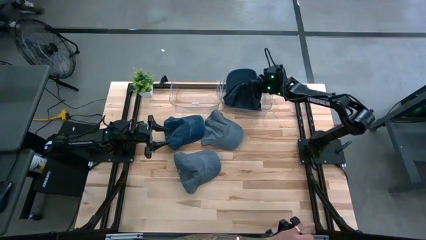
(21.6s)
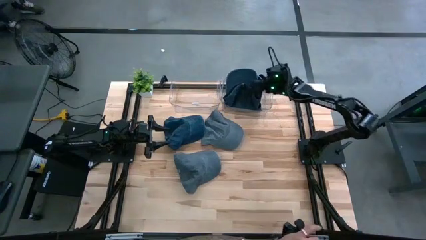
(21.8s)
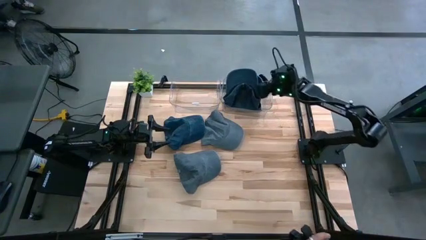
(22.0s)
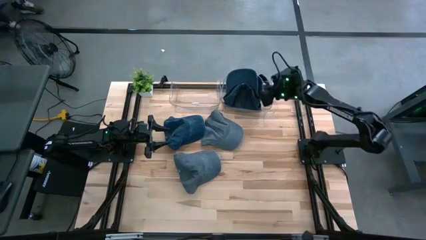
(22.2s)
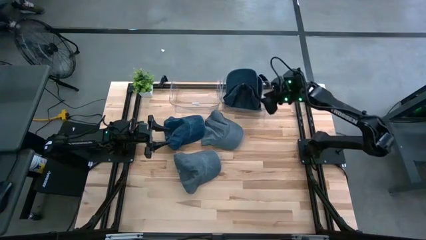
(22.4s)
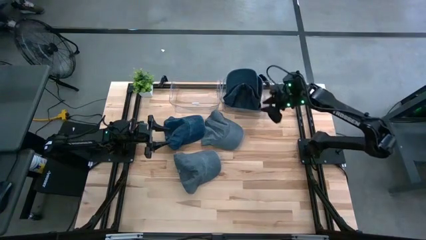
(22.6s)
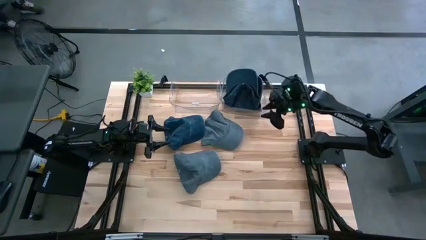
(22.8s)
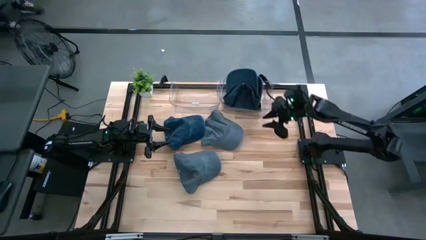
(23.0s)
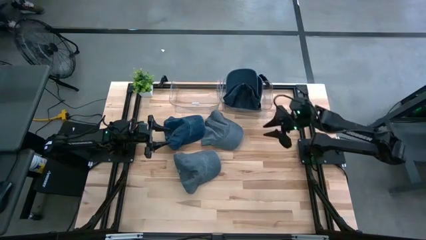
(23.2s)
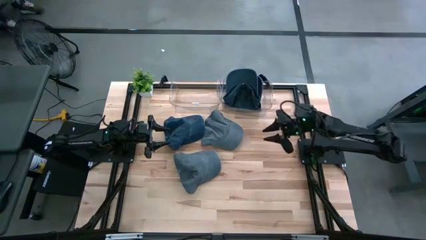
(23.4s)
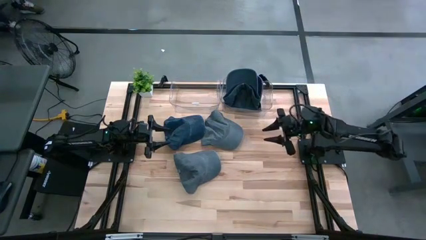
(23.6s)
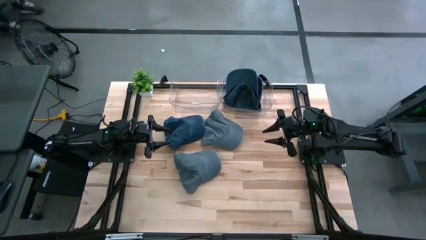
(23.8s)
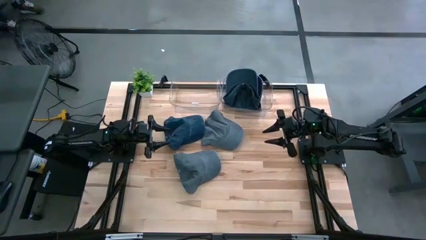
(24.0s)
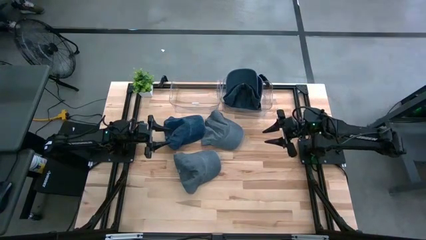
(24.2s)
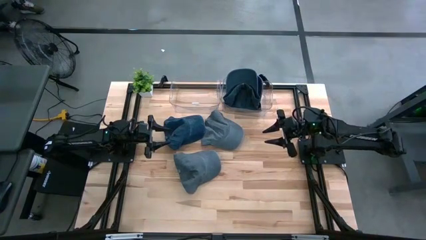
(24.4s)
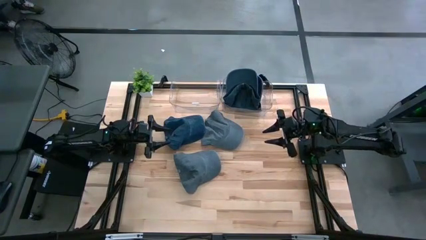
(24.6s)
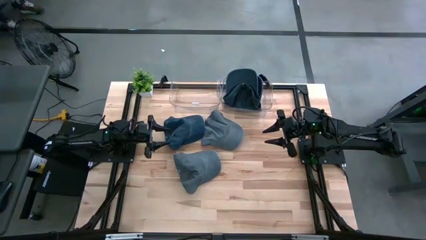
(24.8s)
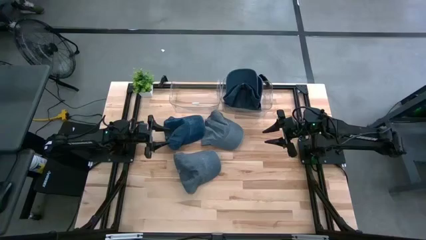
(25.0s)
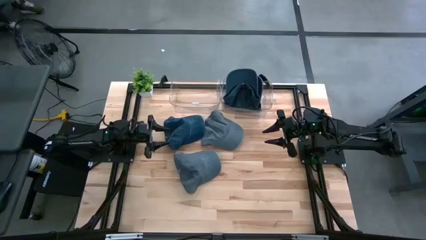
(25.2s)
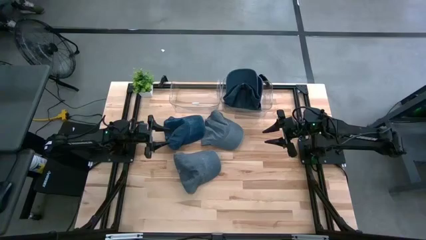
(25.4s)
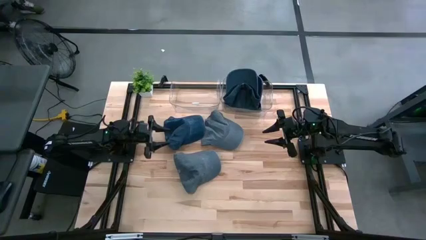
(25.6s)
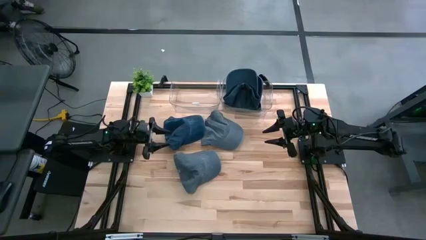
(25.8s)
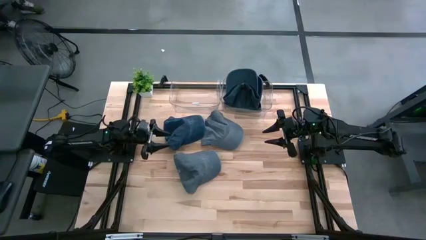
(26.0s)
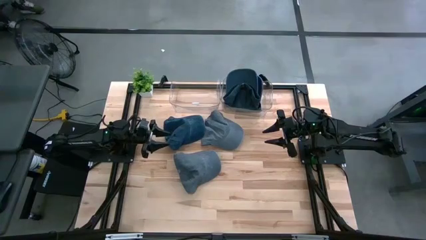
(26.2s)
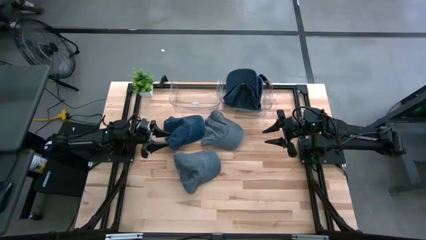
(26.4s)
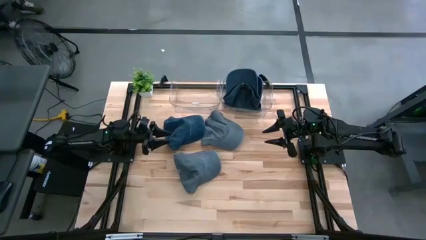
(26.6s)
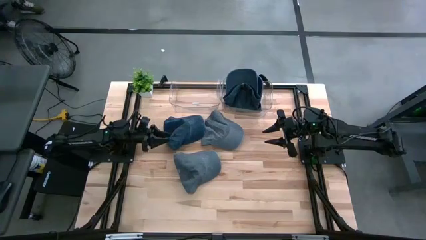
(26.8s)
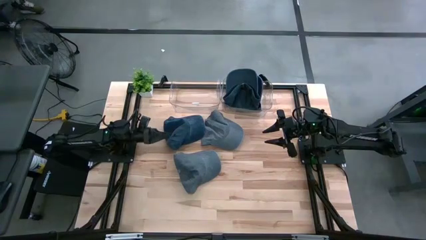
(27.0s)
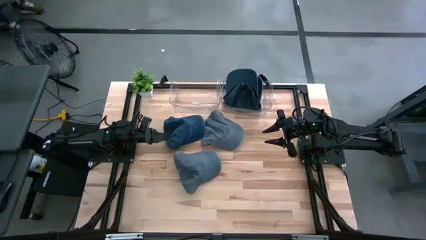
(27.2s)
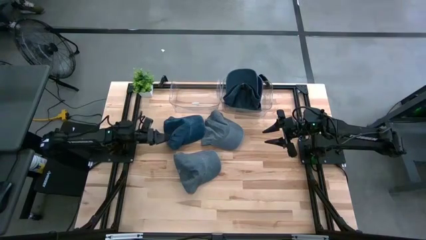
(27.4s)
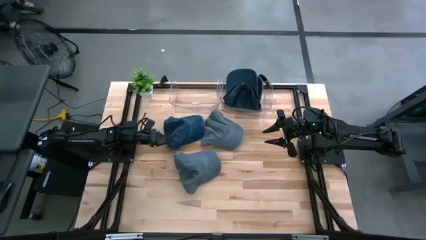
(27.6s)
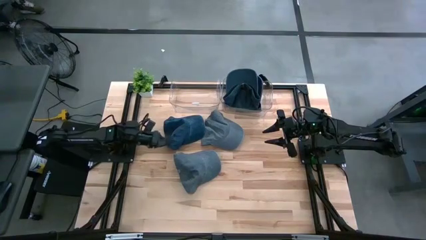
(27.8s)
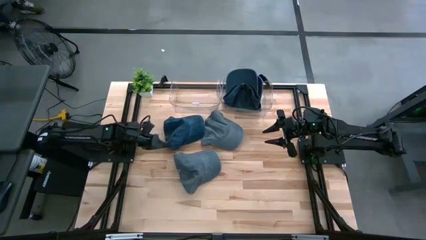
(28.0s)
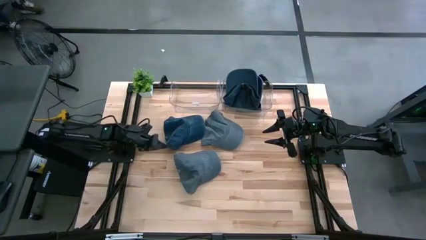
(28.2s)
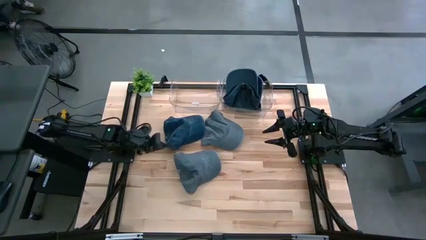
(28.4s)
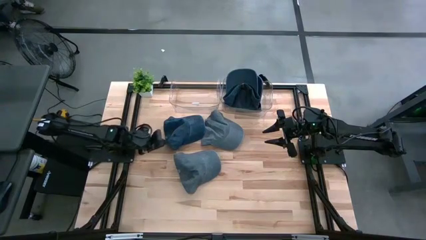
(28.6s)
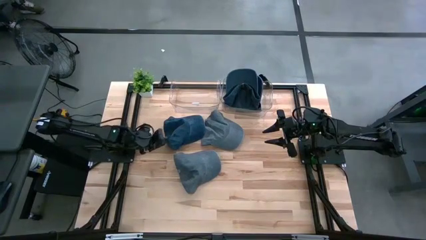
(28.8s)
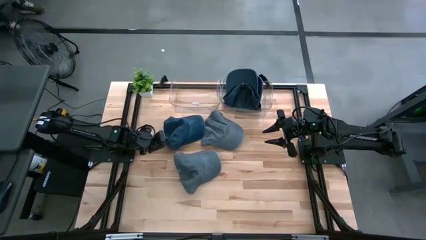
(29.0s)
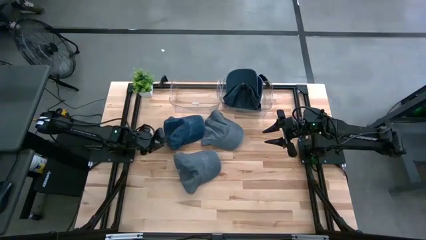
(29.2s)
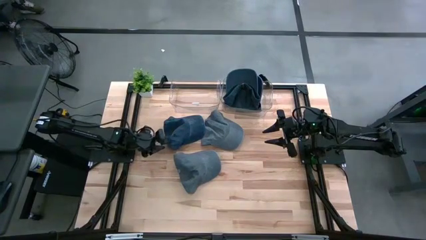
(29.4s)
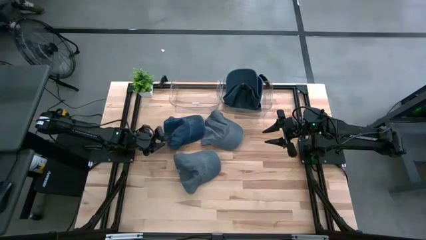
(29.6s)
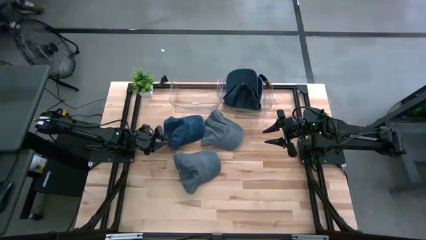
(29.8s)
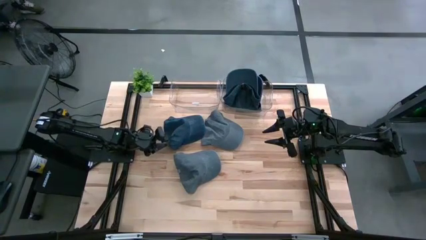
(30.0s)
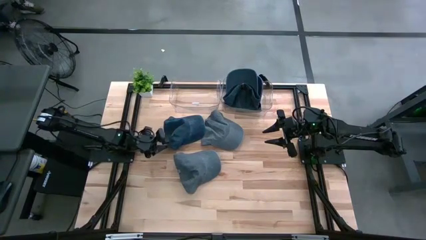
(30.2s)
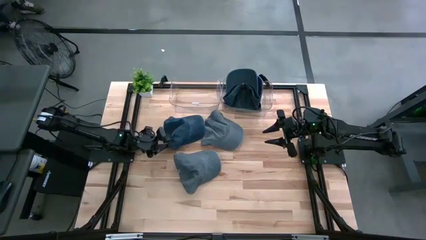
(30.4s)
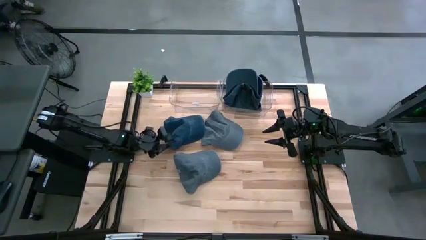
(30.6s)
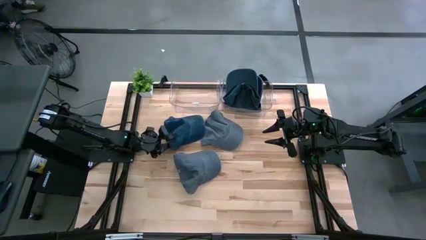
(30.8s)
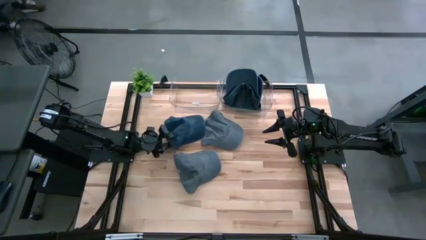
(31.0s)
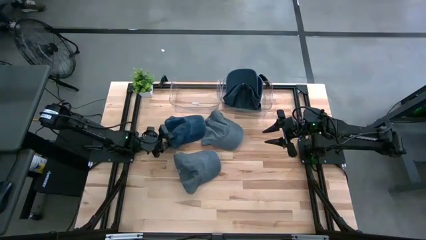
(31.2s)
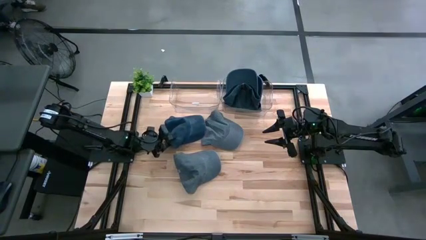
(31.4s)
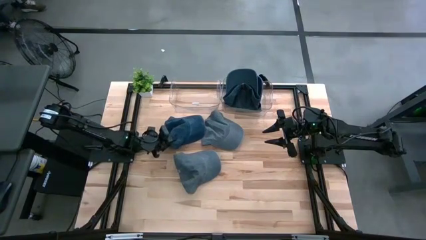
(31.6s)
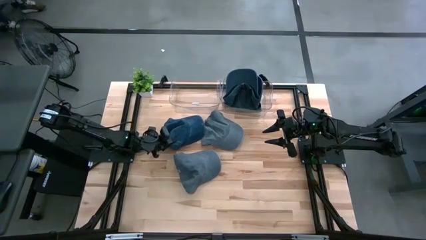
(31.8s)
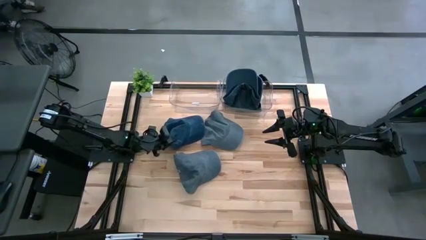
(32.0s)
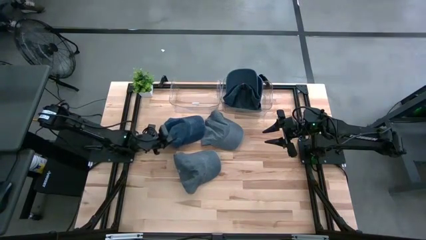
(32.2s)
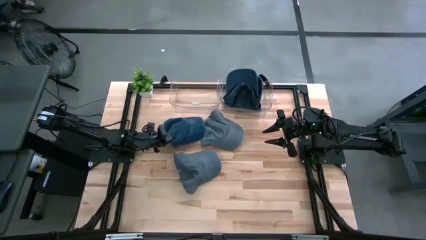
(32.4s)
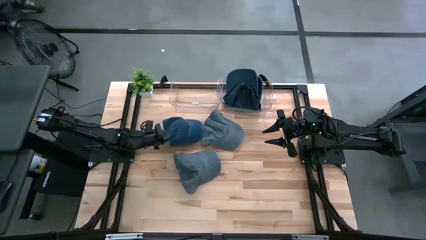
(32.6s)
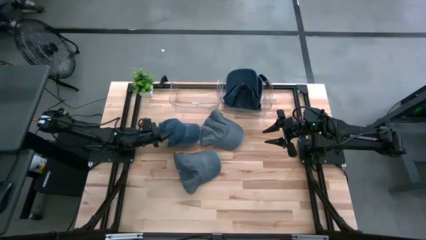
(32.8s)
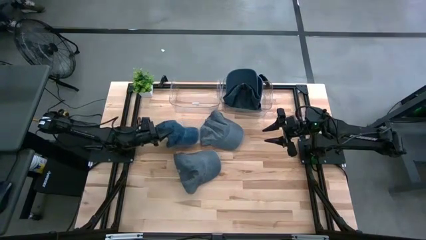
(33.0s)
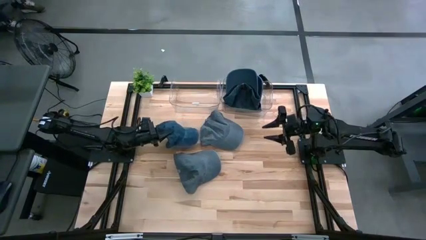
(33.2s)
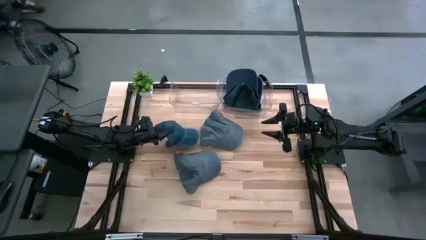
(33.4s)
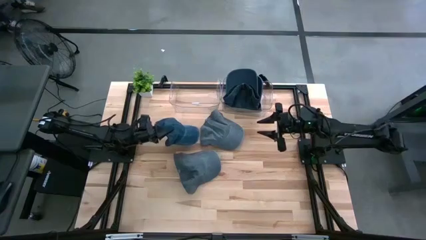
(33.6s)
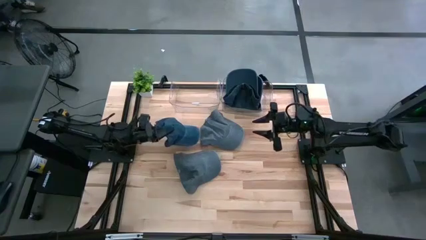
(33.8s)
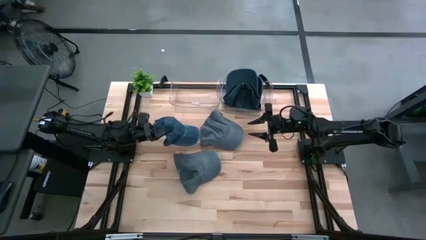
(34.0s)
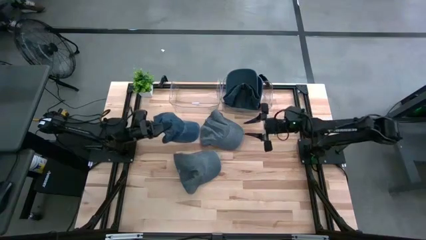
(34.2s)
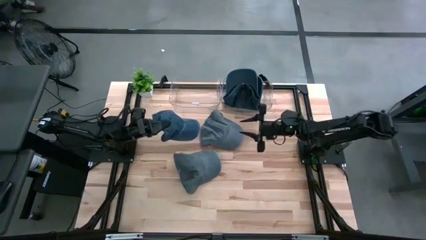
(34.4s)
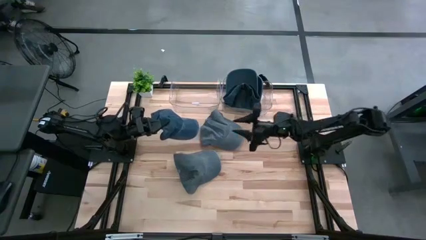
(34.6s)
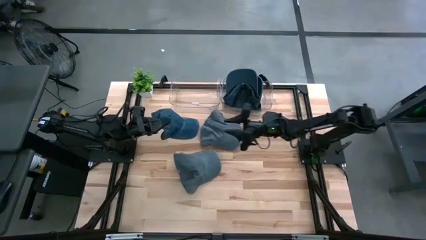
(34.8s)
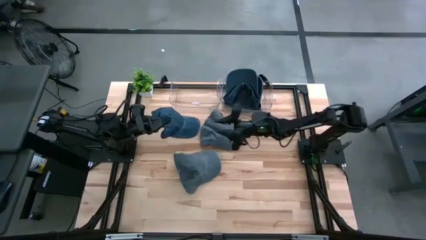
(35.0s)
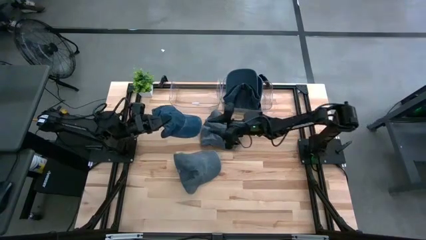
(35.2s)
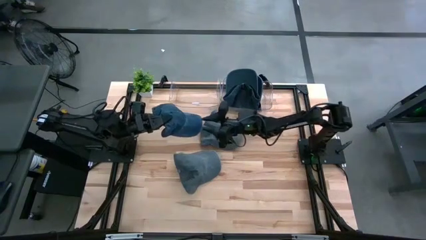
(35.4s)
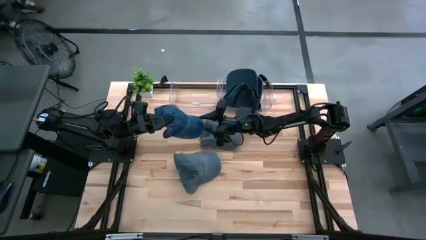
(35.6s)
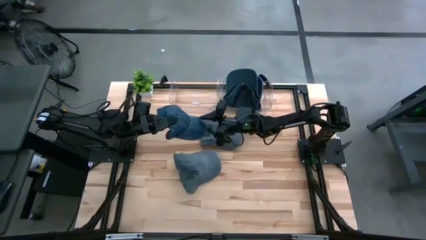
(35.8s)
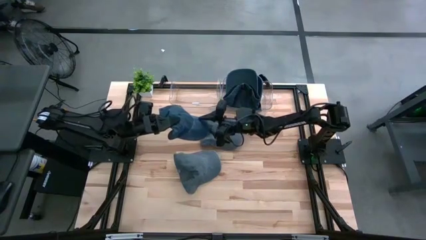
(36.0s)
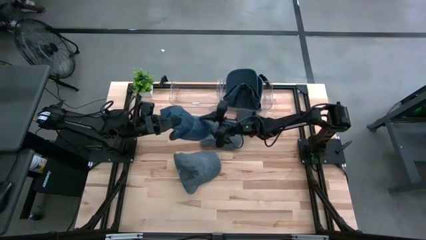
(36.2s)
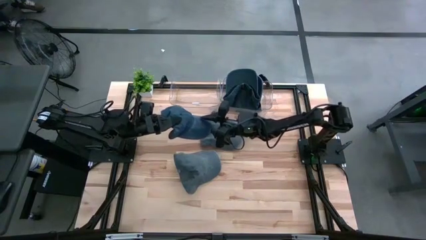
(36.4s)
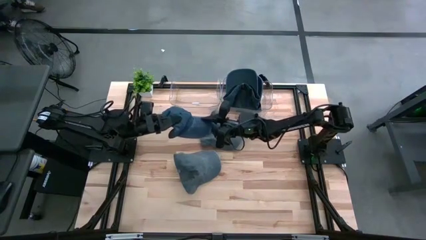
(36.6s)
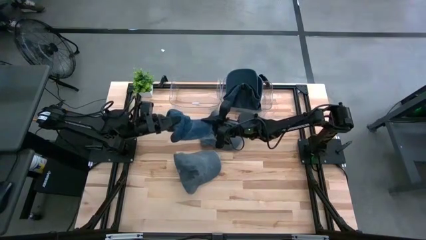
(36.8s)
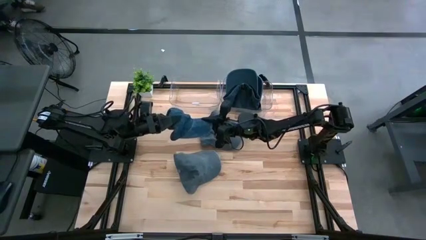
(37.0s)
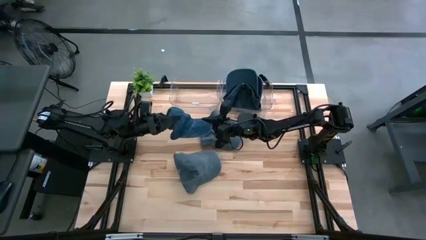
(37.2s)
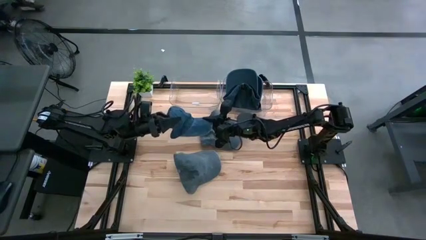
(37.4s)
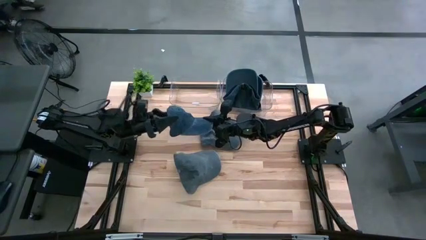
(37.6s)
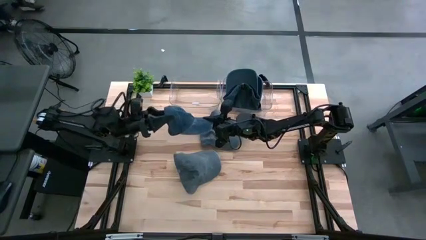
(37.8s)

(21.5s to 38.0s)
Task: Pick & Place hat
Put the blue cap into the right transparent bin
